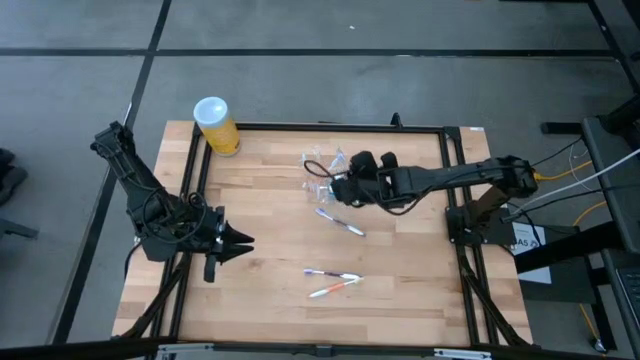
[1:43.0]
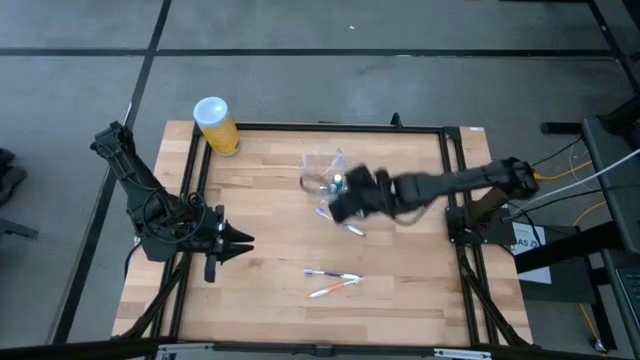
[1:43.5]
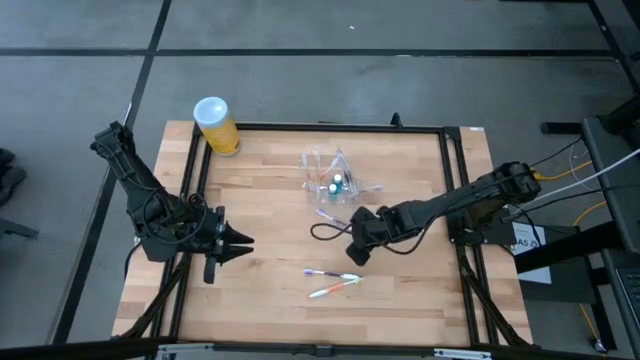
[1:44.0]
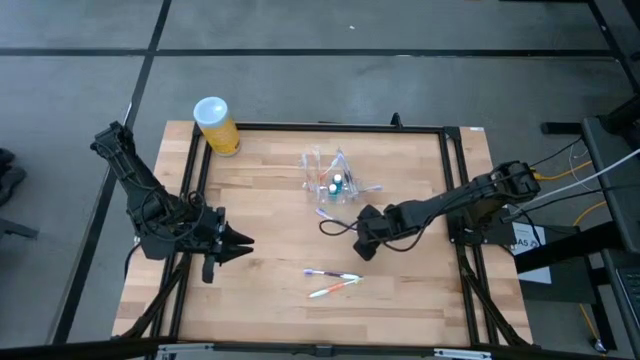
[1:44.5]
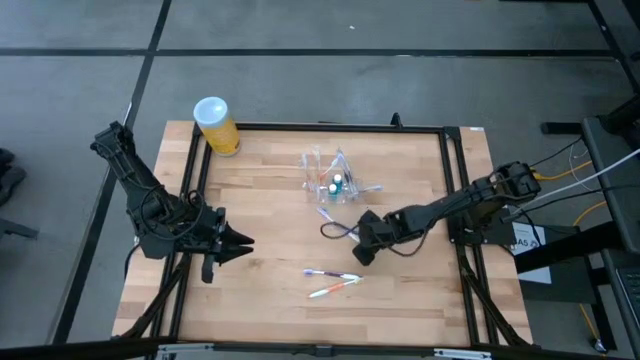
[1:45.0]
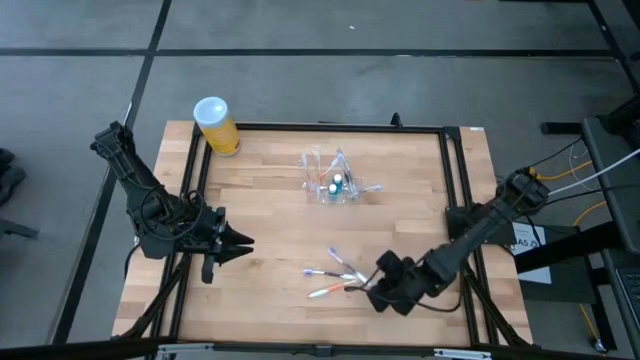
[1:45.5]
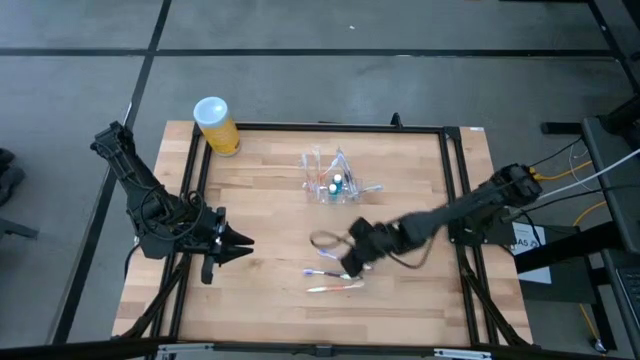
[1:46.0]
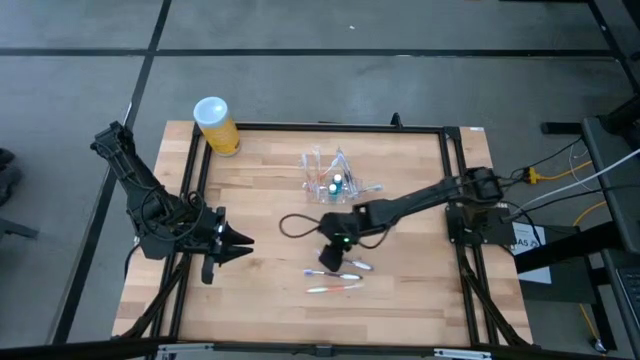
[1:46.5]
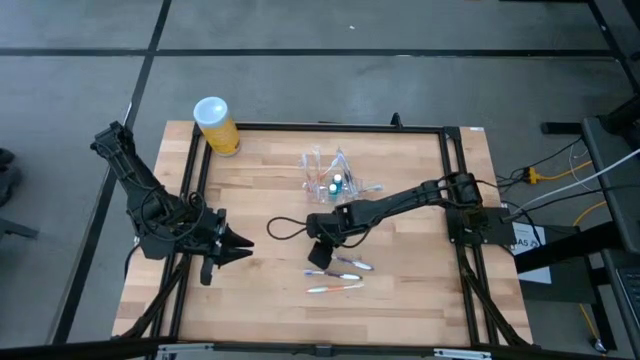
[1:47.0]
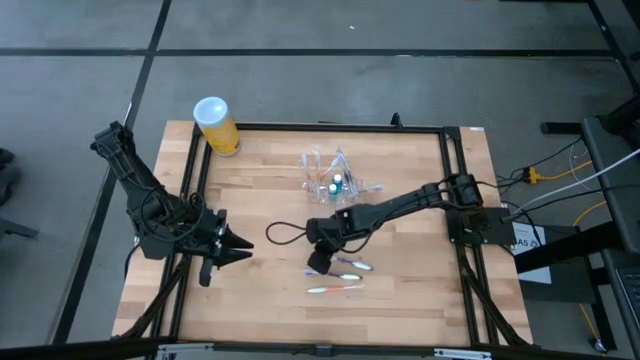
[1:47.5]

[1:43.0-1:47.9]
Task: Pick & Place toothbrushing station
Put the violet toothbrush into the transparent organizer

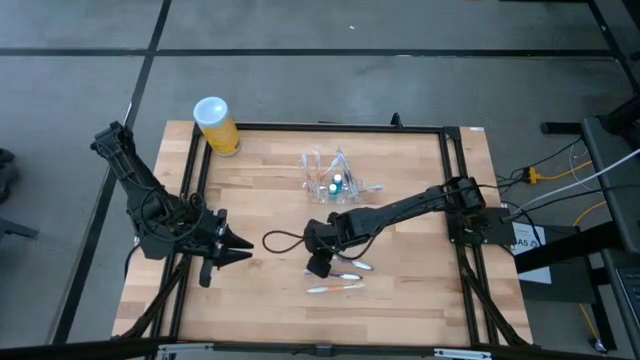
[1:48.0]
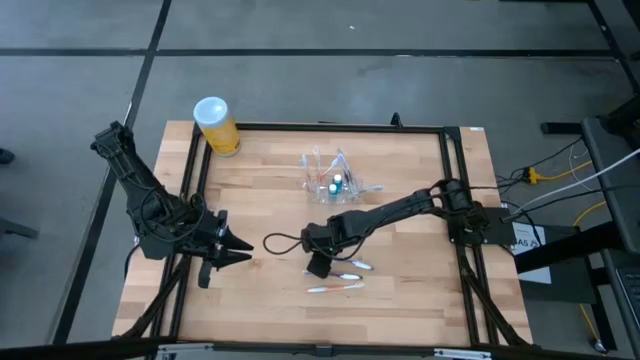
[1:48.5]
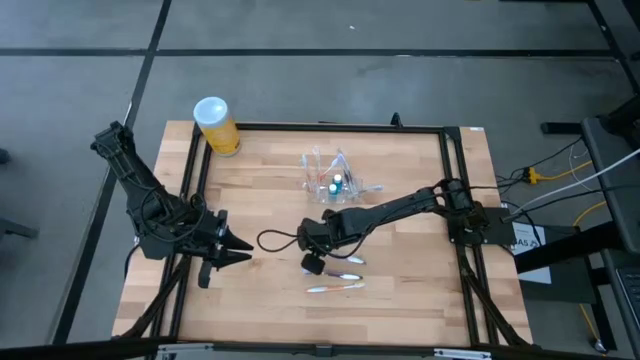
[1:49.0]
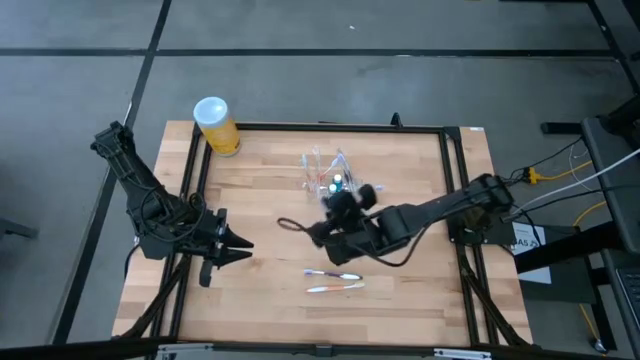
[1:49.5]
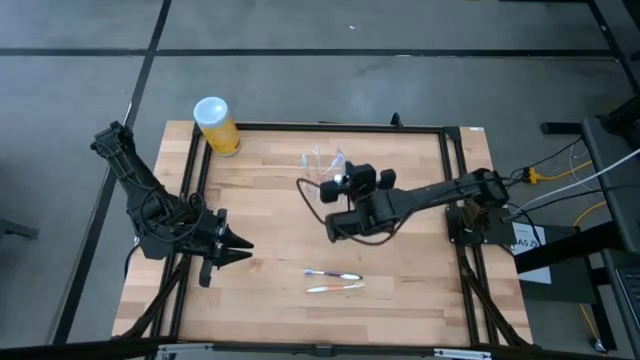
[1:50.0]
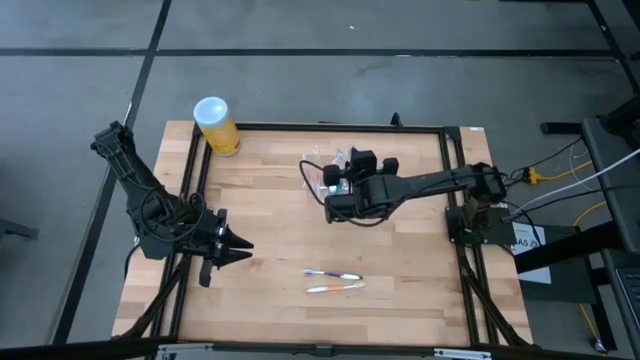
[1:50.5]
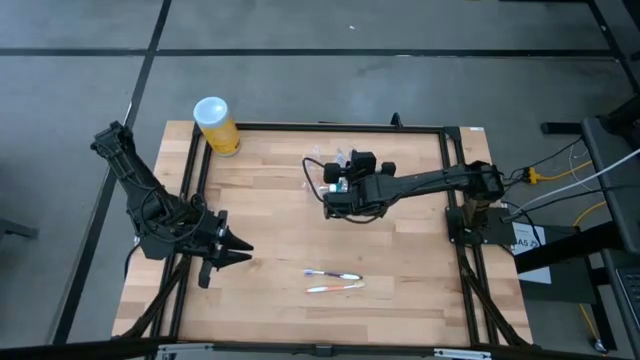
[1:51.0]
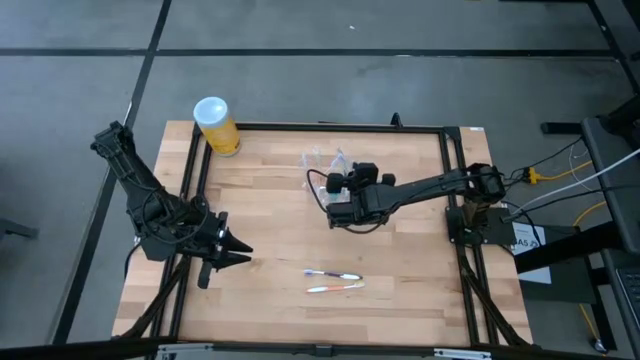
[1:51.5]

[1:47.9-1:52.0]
Put the violet toothbrush into the transparent organizer

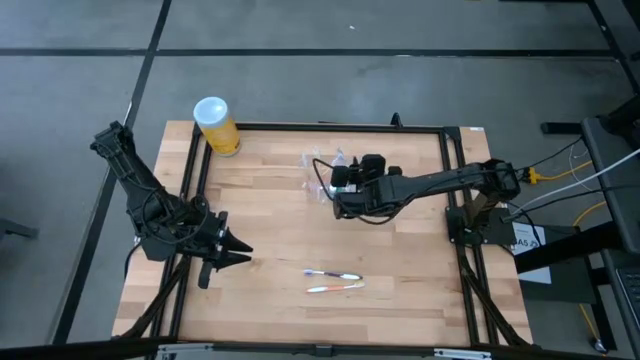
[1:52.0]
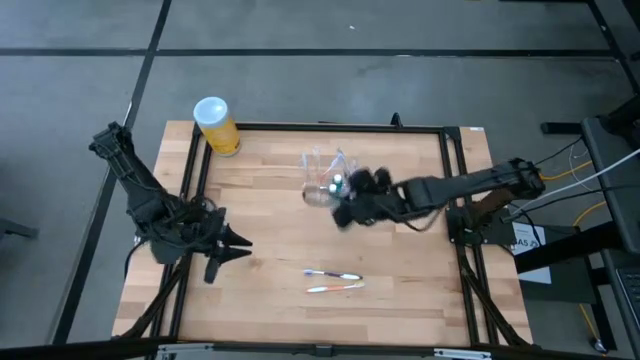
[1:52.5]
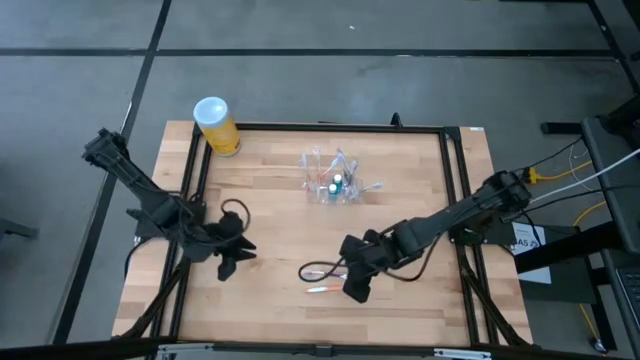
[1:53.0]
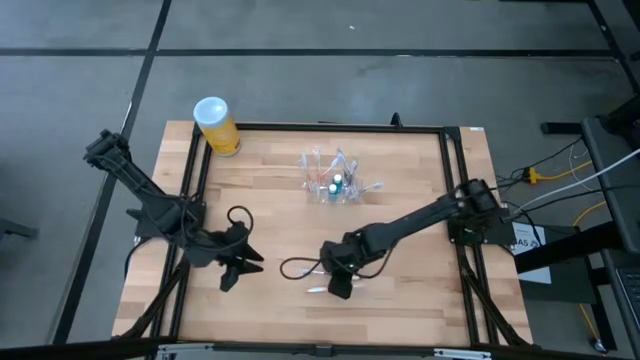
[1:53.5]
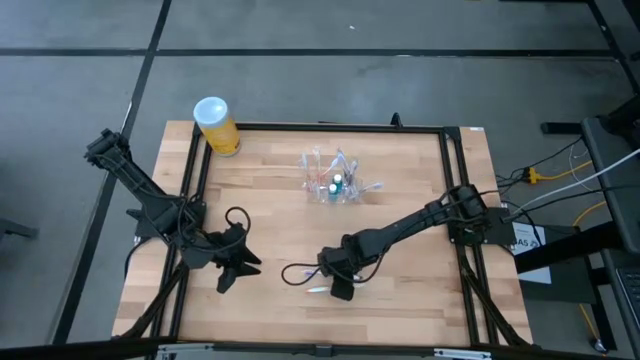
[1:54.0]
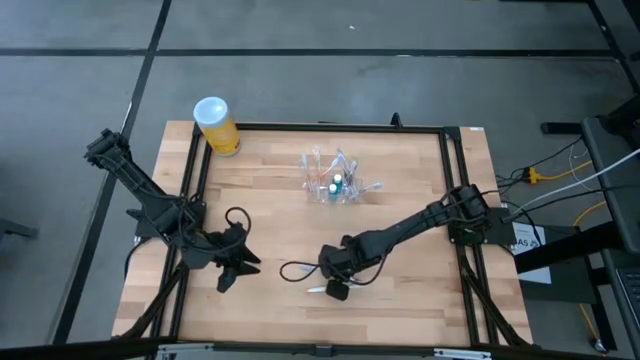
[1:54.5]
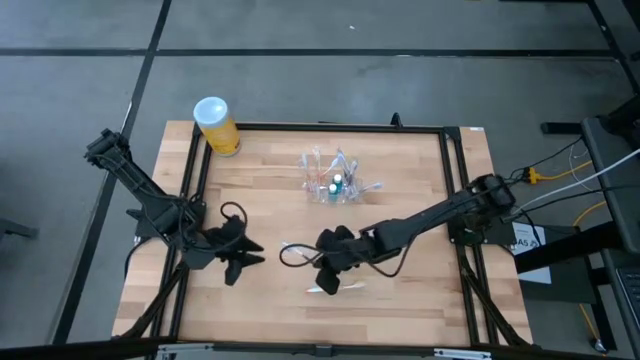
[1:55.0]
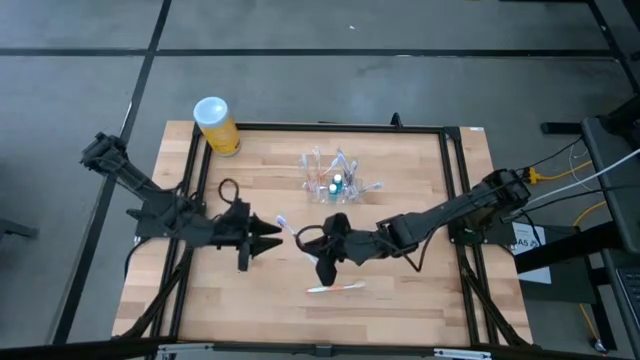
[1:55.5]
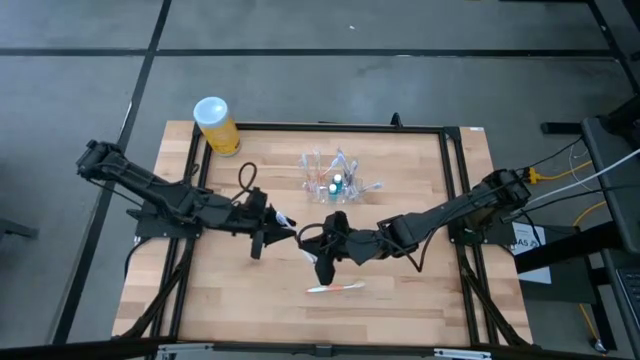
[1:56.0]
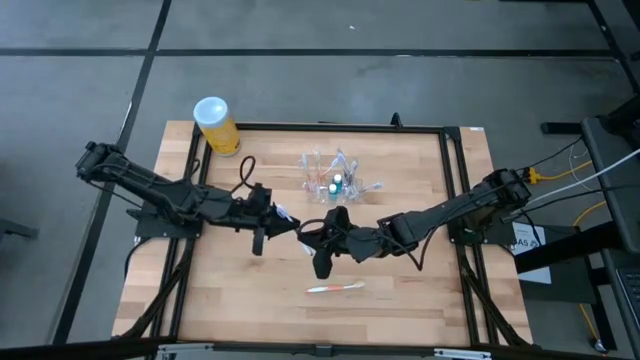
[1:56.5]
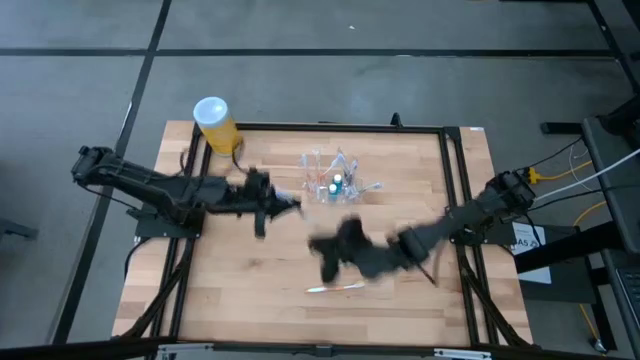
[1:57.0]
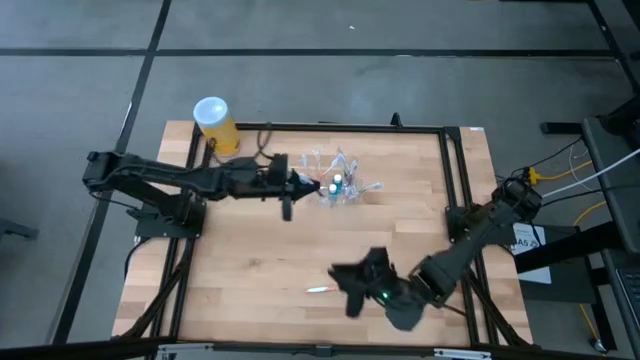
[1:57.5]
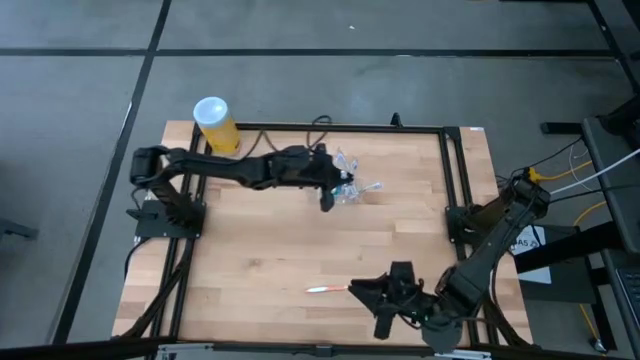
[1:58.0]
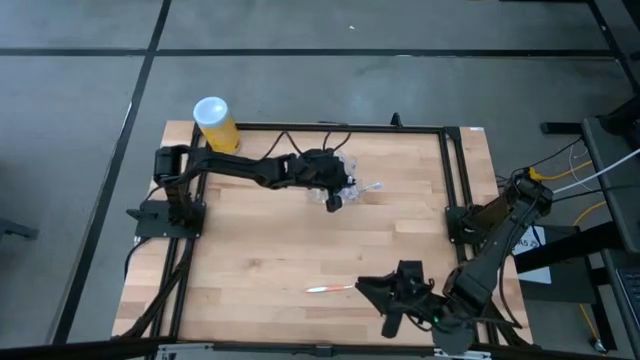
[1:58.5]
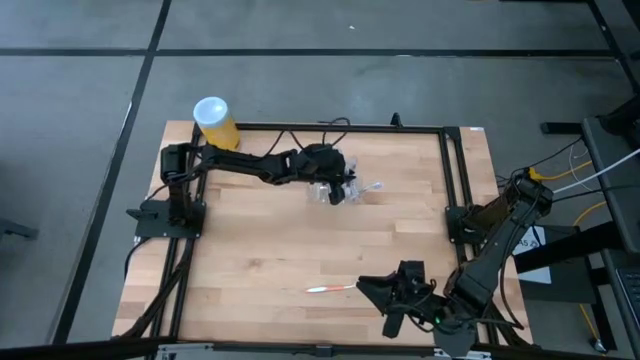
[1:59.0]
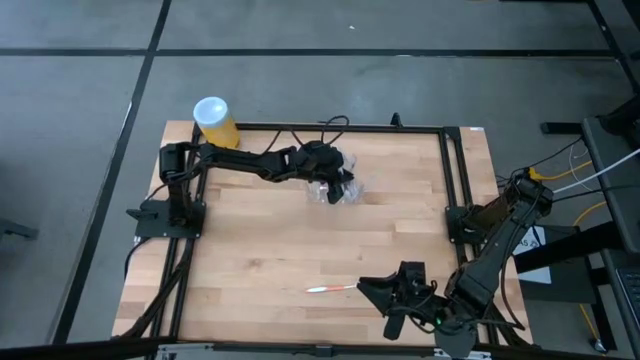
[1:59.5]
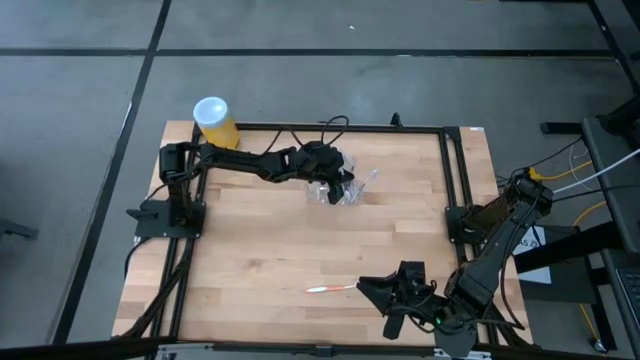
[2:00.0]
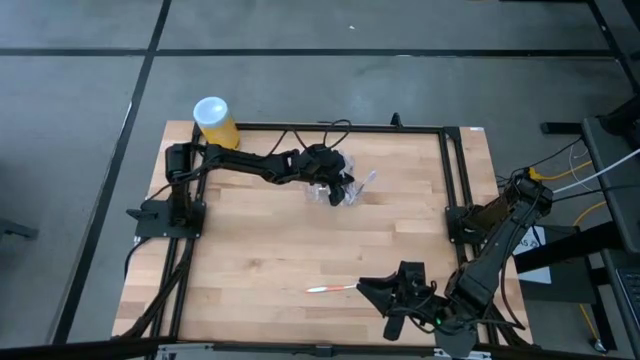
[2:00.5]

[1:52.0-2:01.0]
Put the violet toothbrush into the transparent organizer

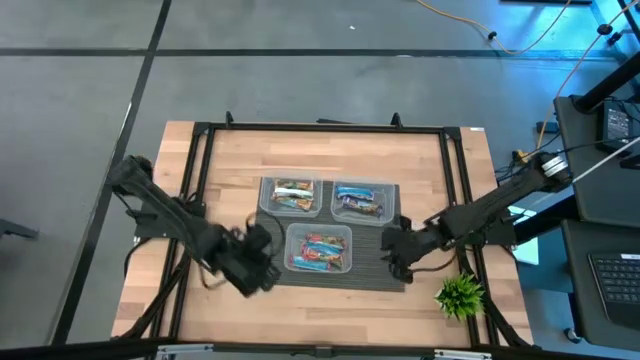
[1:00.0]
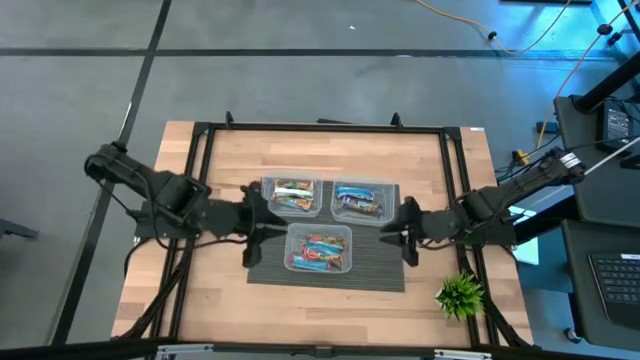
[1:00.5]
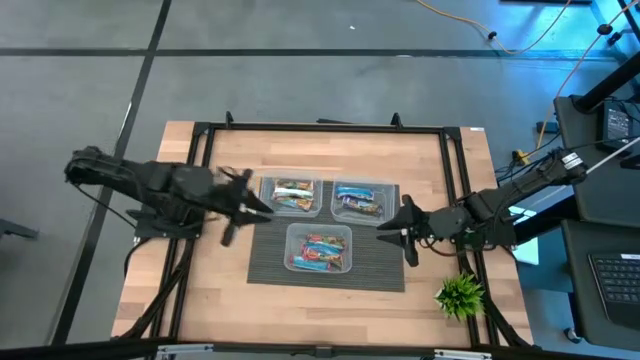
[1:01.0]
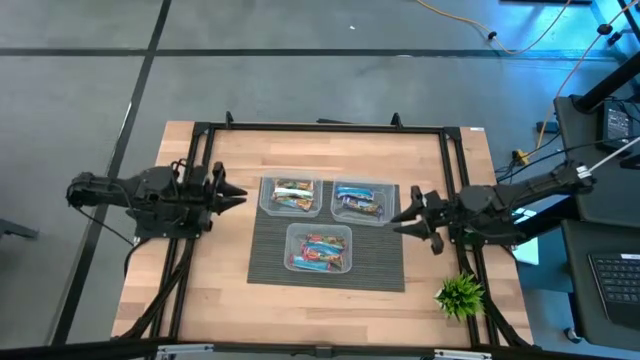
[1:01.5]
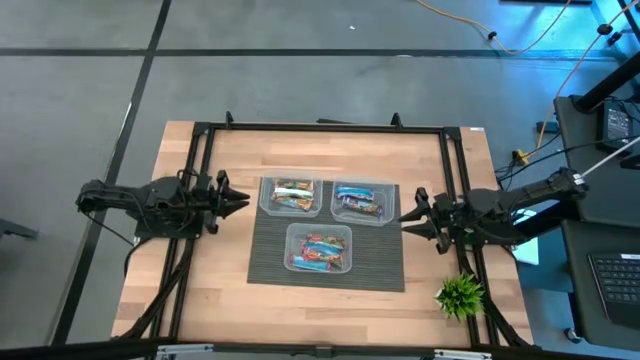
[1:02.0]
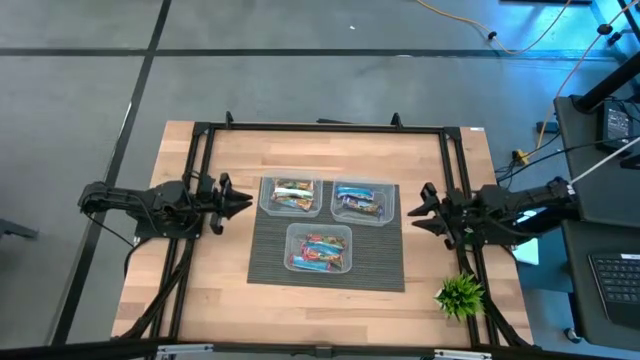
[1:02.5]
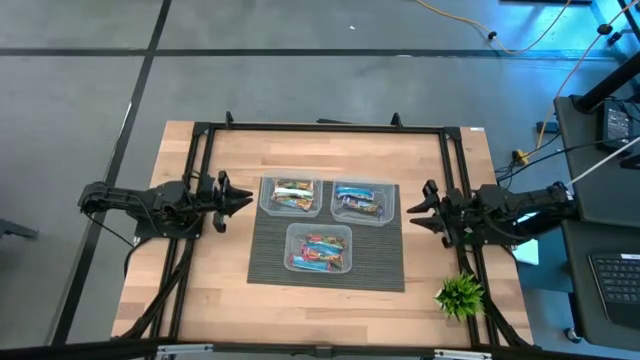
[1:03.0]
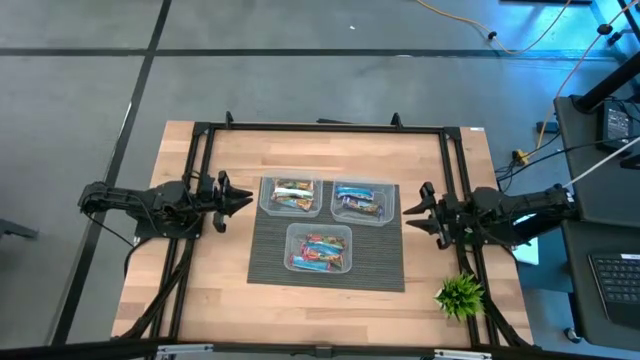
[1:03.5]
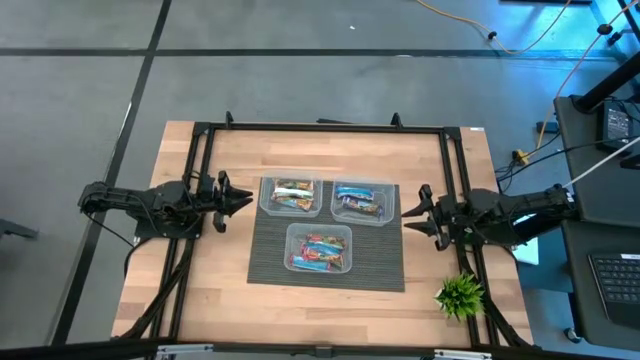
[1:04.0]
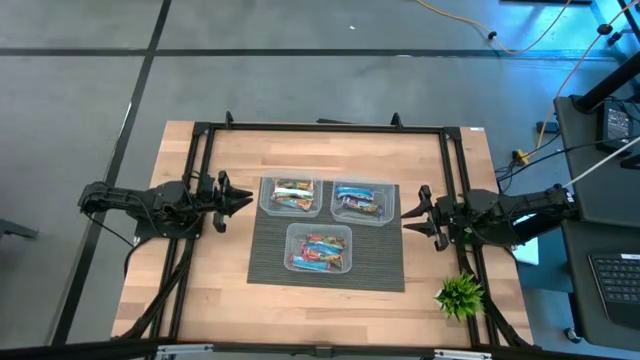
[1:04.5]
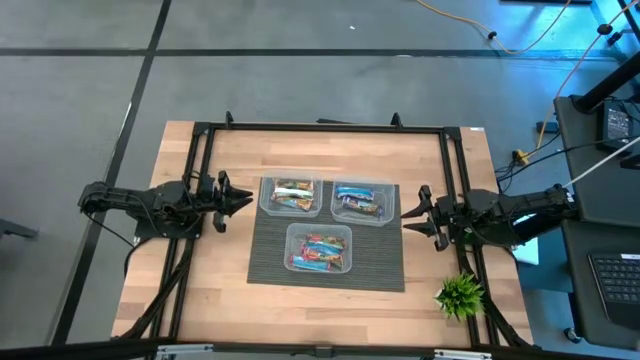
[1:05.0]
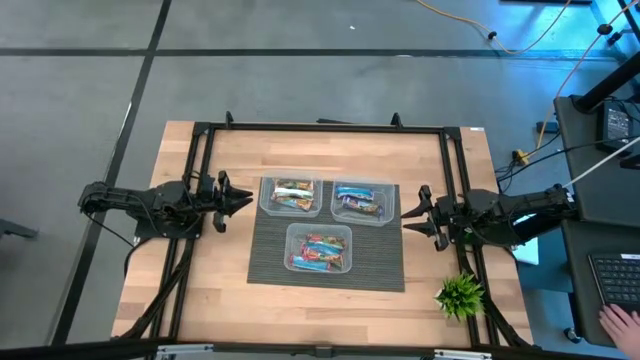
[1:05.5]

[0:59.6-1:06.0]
Task: Pick and place Granola Bars by type
Return to Home Position
